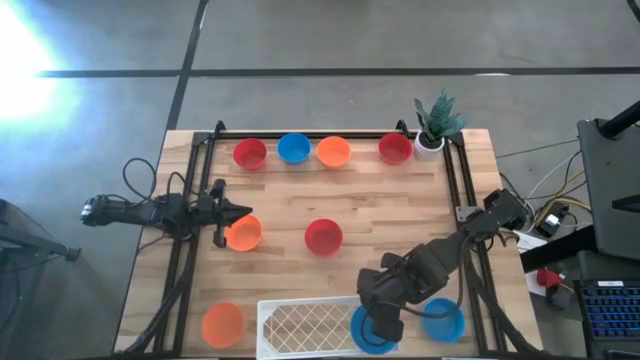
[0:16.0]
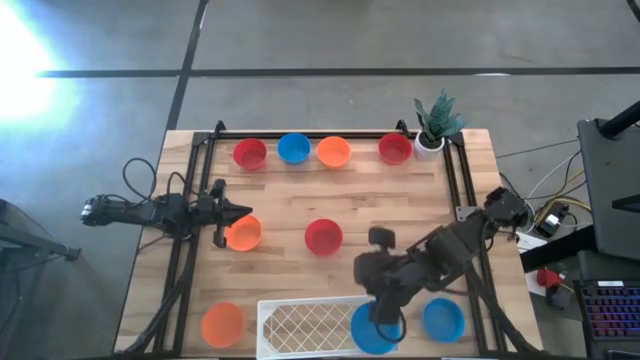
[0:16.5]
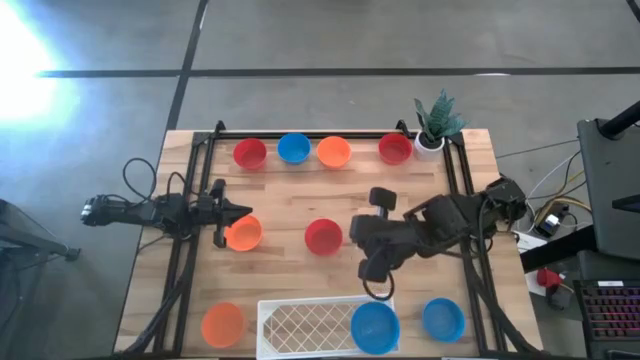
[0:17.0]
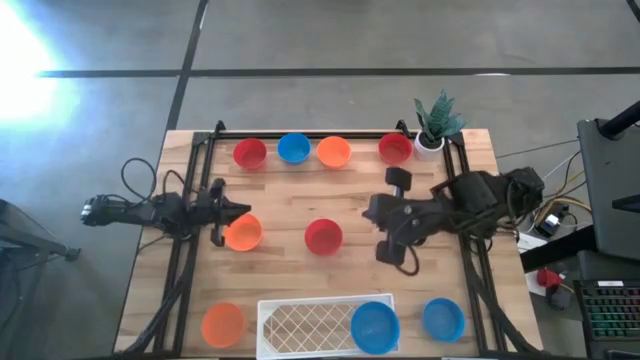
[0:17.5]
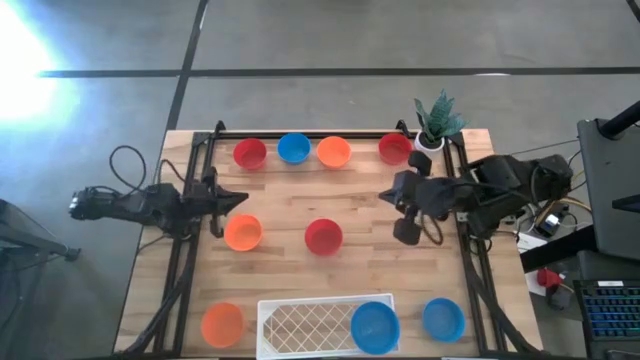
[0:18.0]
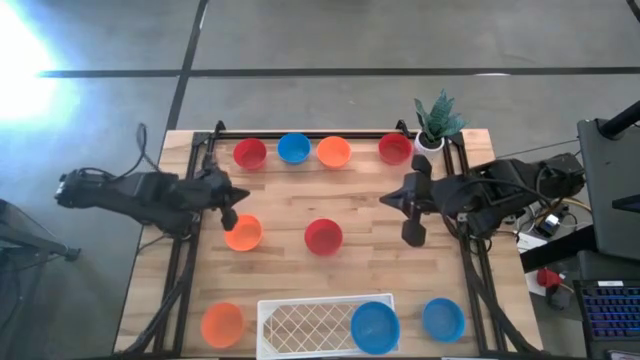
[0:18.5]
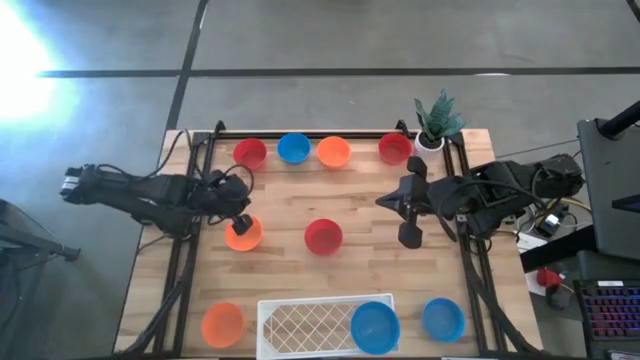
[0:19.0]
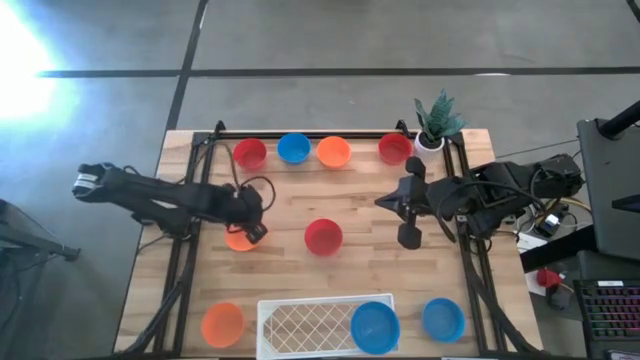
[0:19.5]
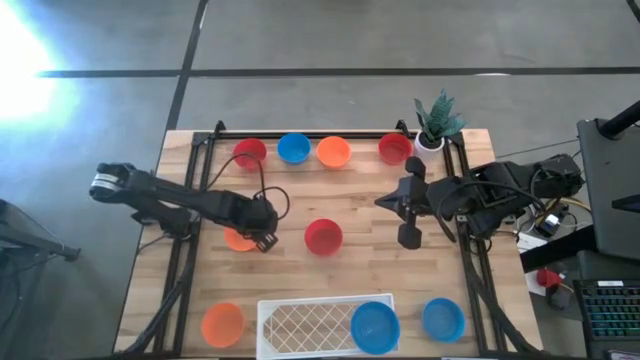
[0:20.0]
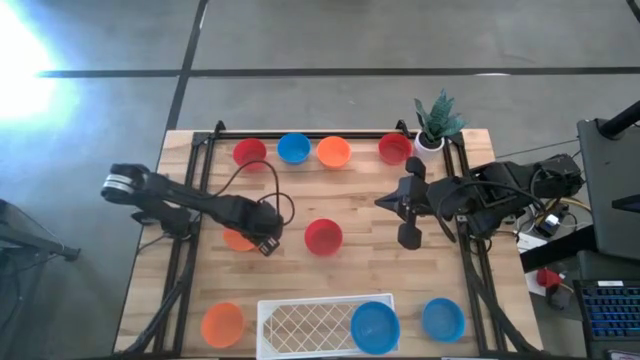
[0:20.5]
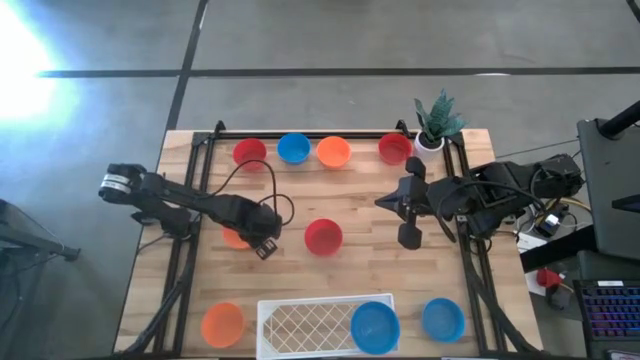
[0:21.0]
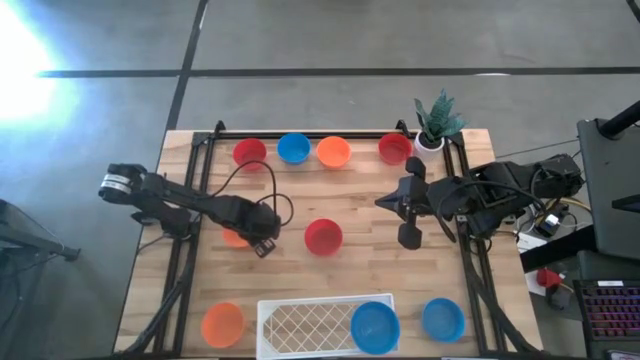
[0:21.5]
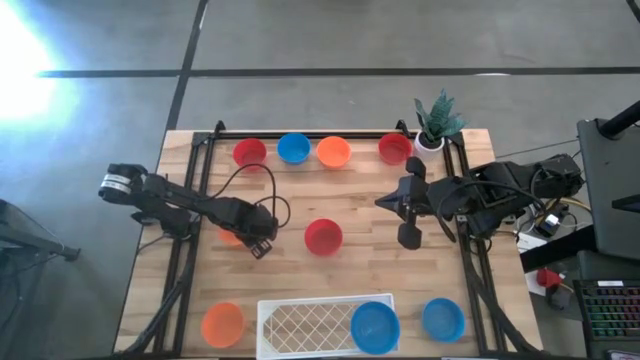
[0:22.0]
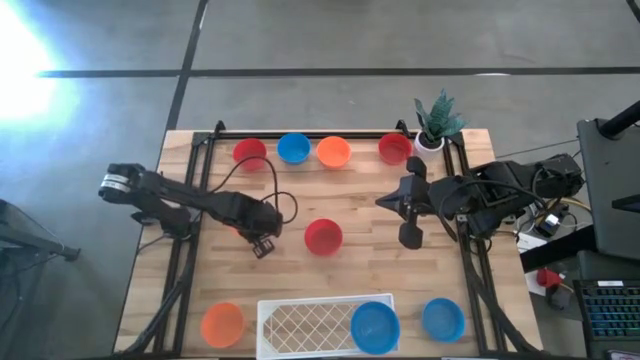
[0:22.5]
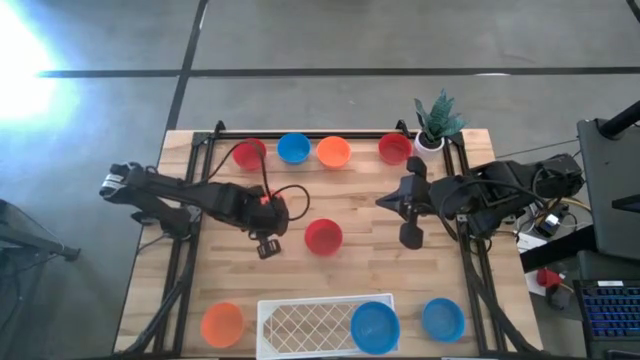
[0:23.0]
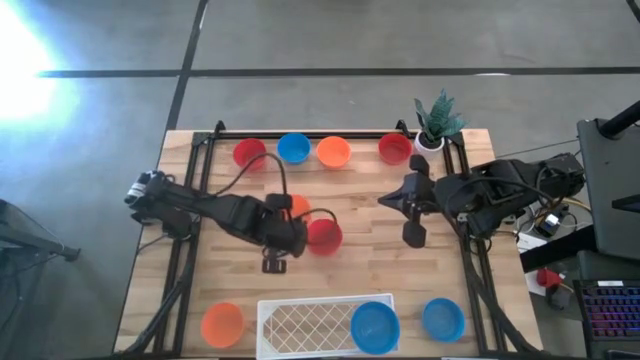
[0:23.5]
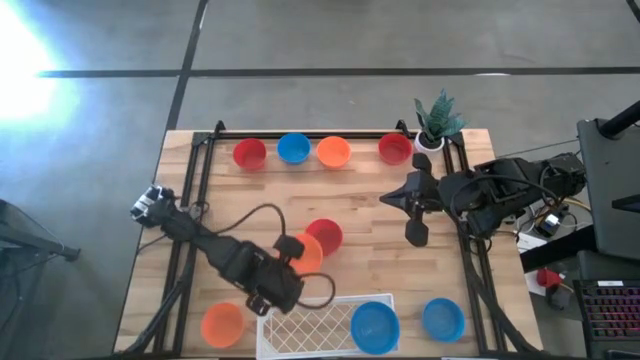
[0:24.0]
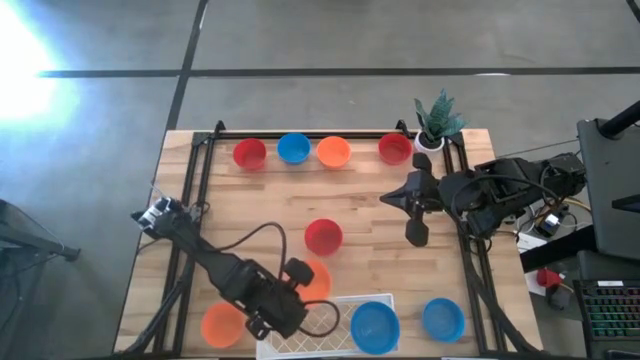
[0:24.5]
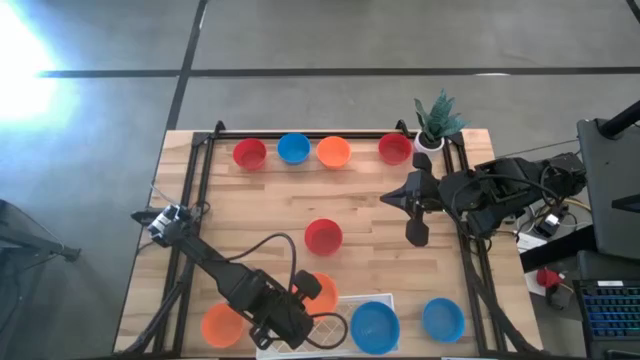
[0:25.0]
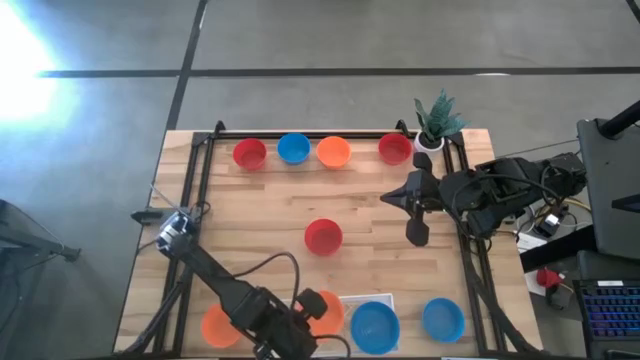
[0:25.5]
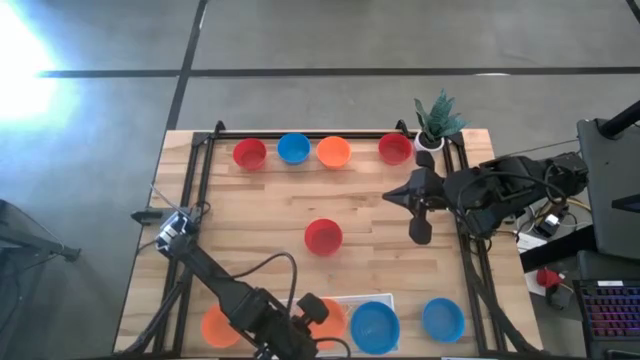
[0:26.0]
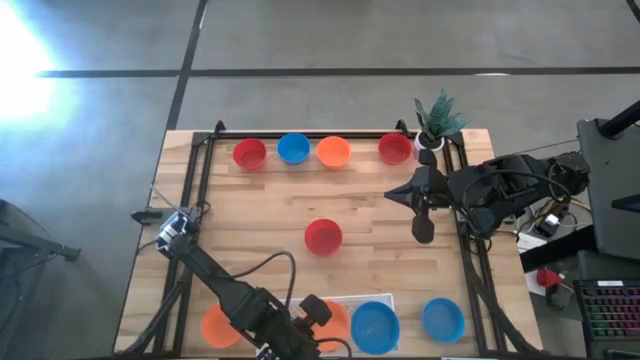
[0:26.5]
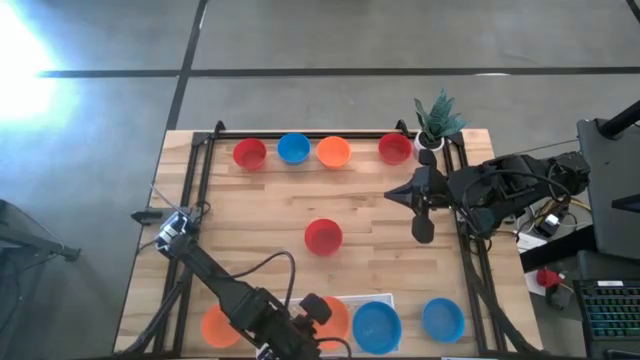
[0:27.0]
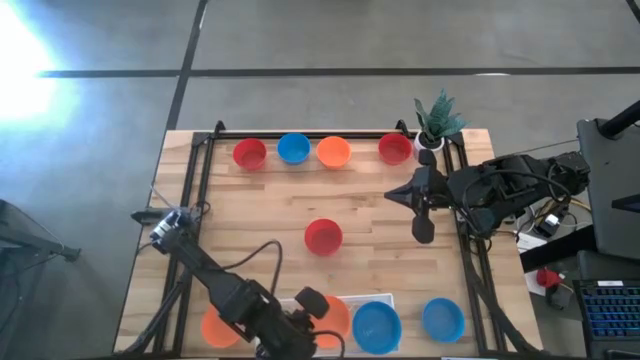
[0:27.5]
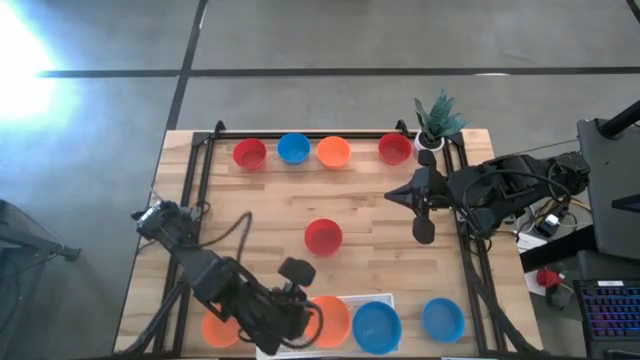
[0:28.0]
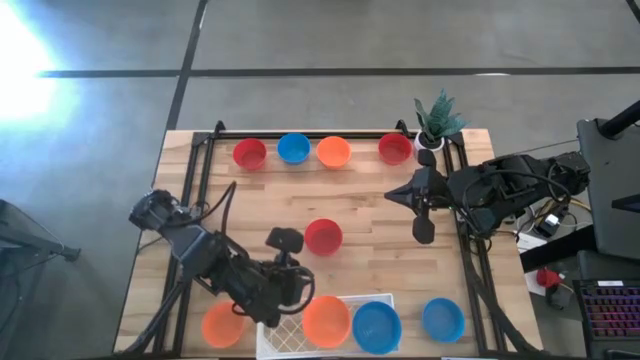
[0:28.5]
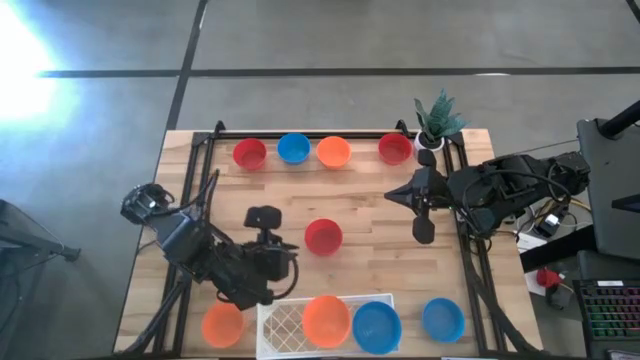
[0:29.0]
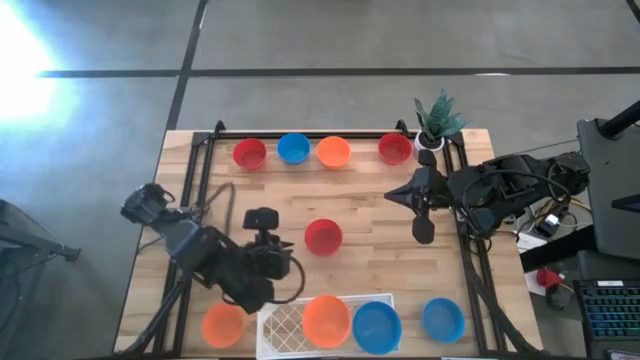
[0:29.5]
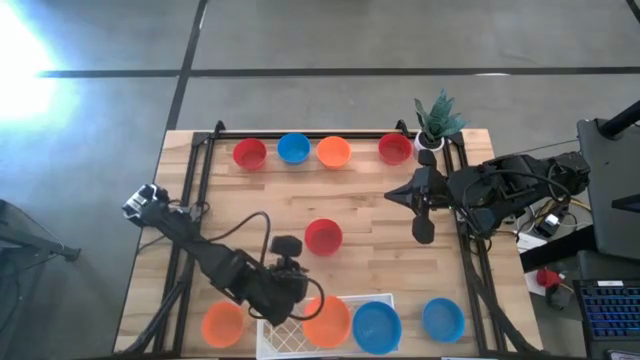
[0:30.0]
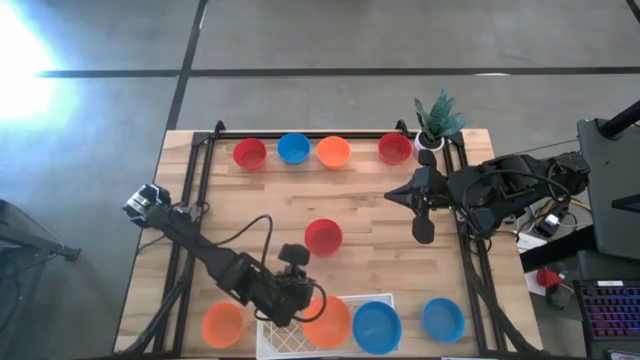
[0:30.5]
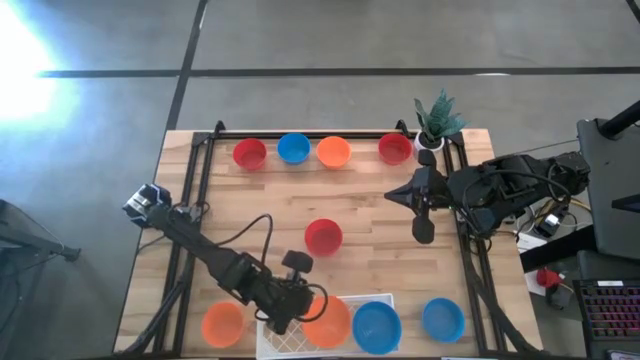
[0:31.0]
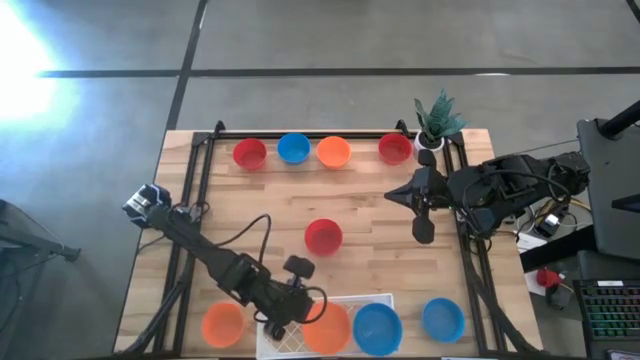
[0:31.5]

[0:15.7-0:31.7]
Task: Pick & Place Mini bowls
Put the middle orange bowl on the shelf

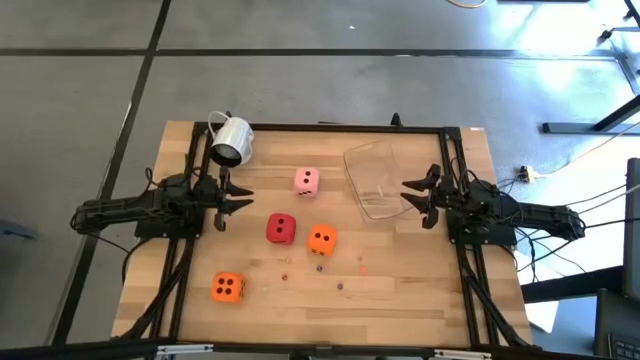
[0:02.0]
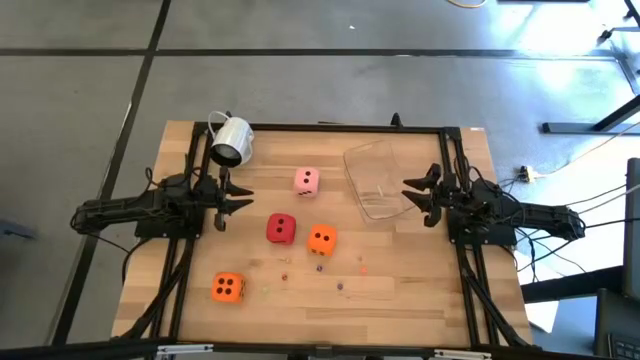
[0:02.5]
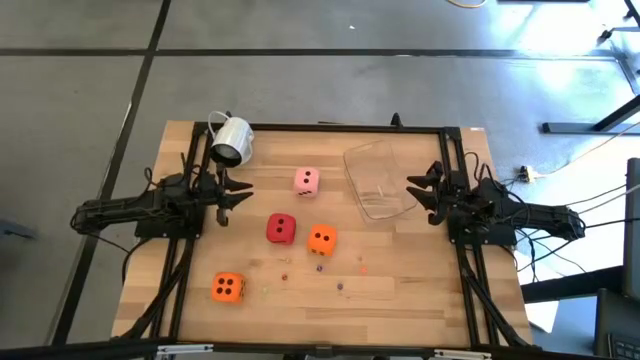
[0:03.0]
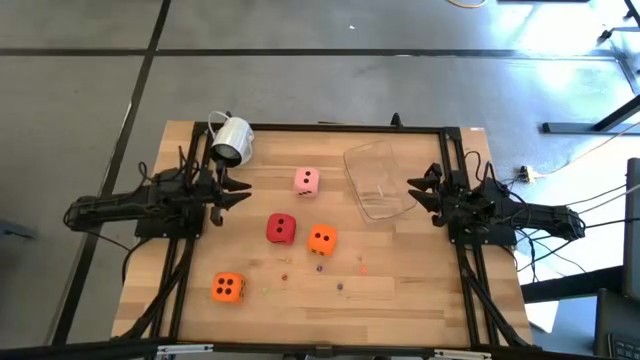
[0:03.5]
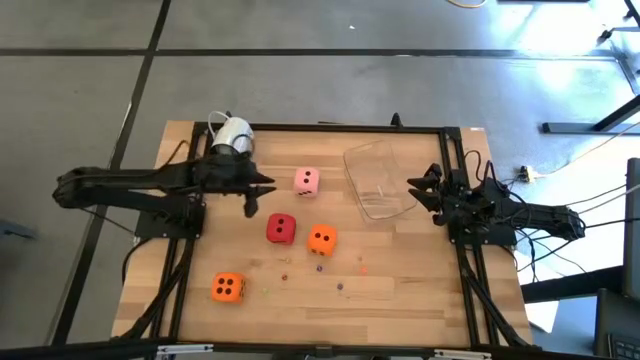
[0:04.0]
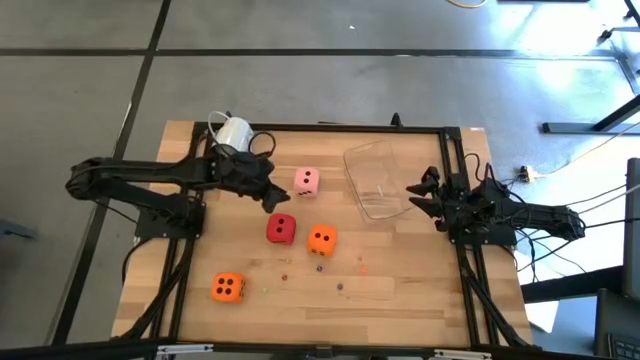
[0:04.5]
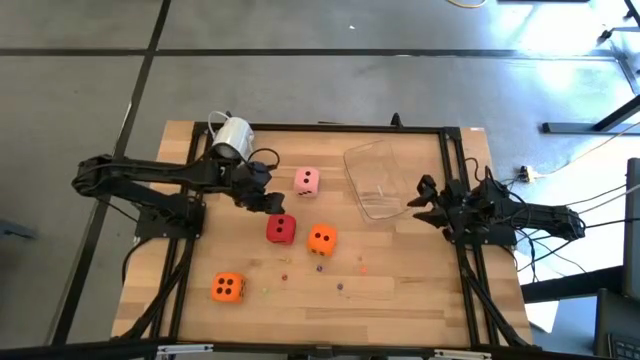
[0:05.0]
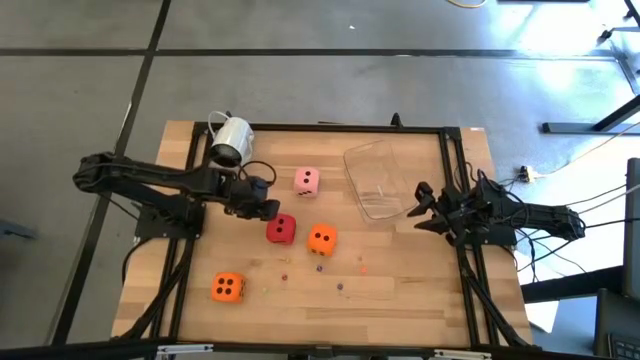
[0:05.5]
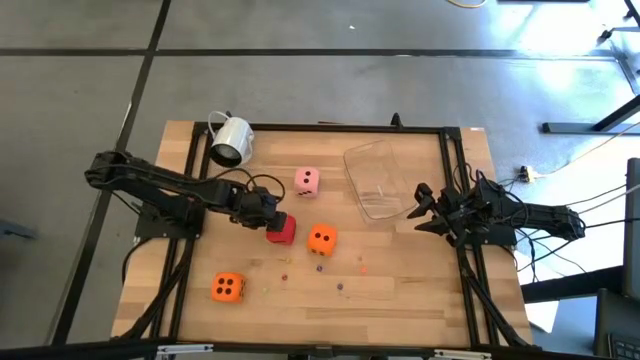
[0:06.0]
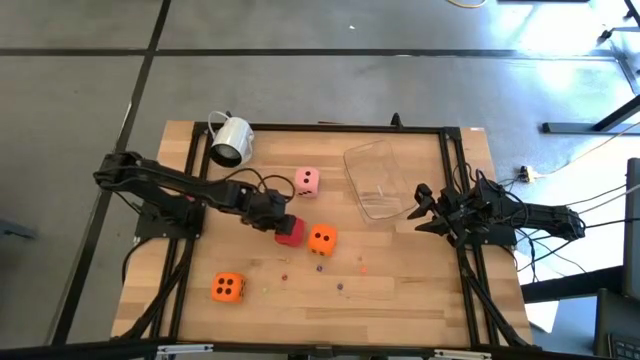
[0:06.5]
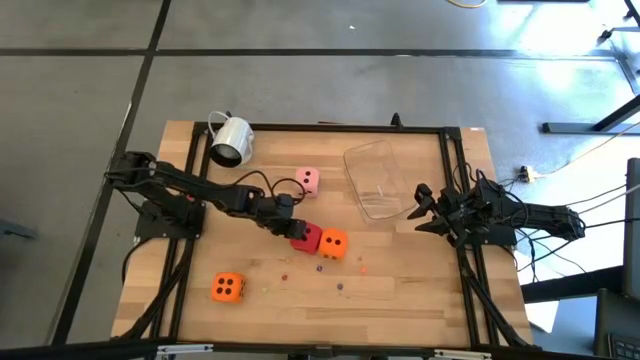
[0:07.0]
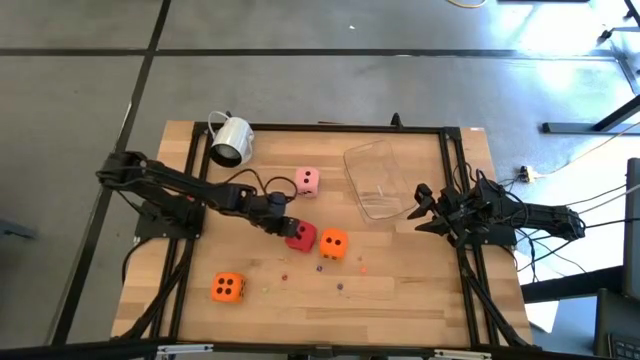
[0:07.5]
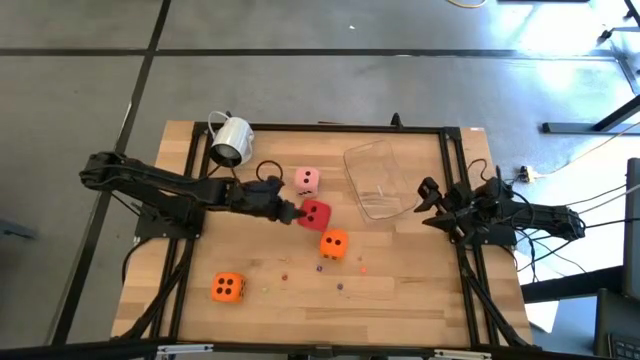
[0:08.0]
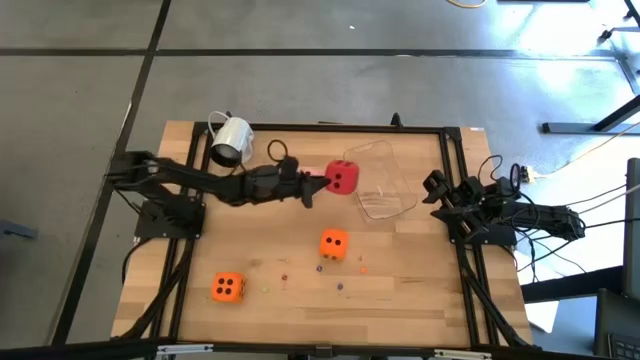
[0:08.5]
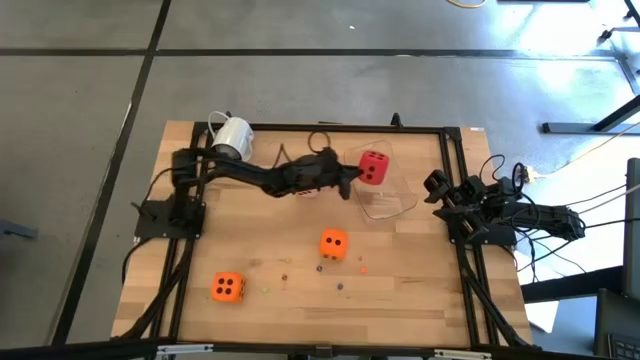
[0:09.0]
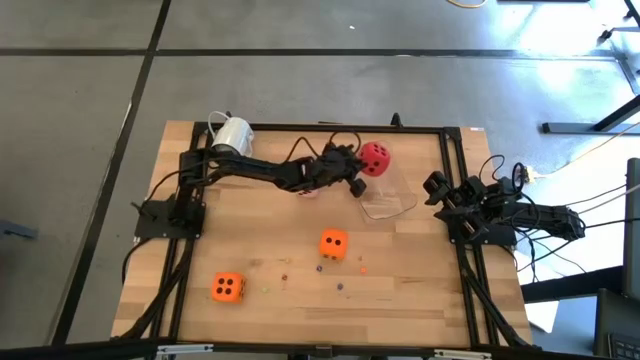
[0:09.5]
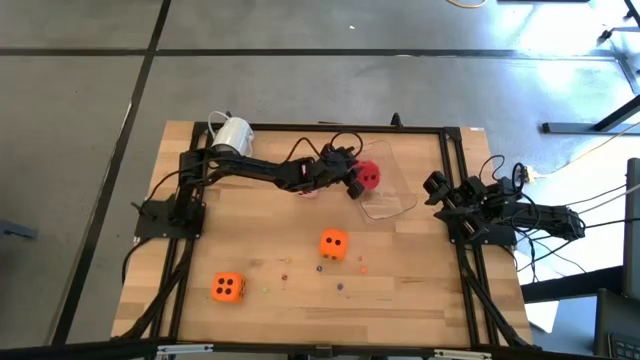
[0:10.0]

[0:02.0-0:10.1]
Task: Pick & Place Dice
Put the large red die in the bin
